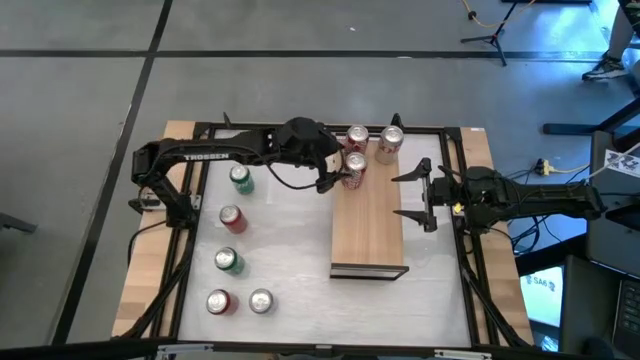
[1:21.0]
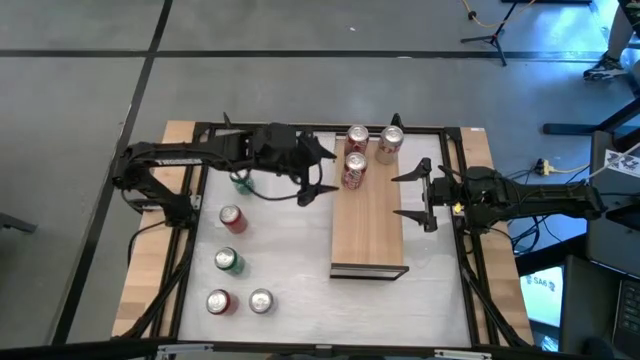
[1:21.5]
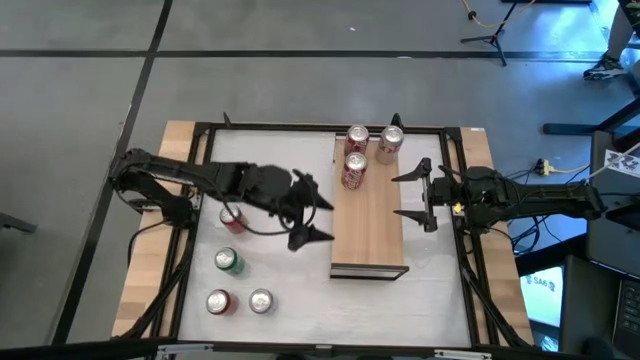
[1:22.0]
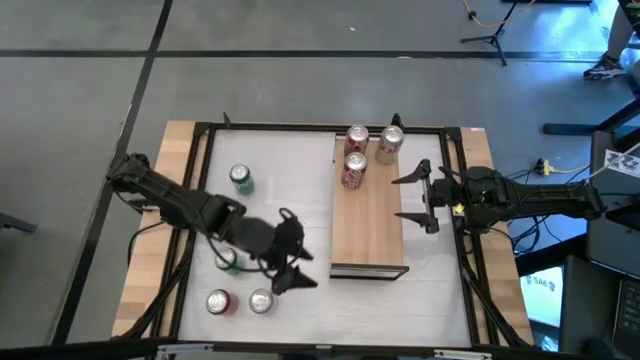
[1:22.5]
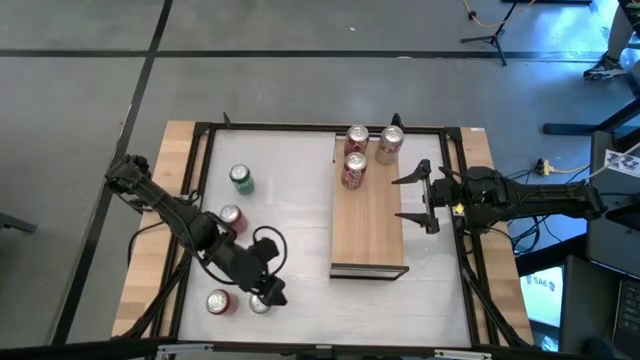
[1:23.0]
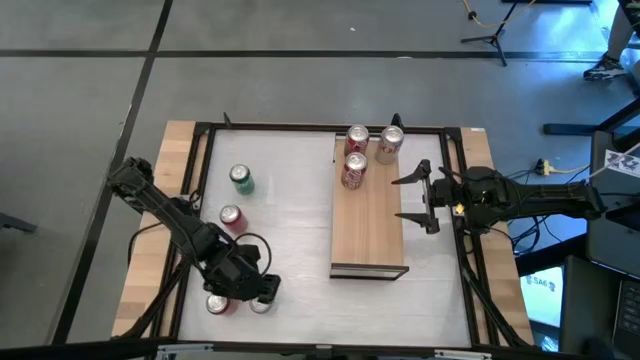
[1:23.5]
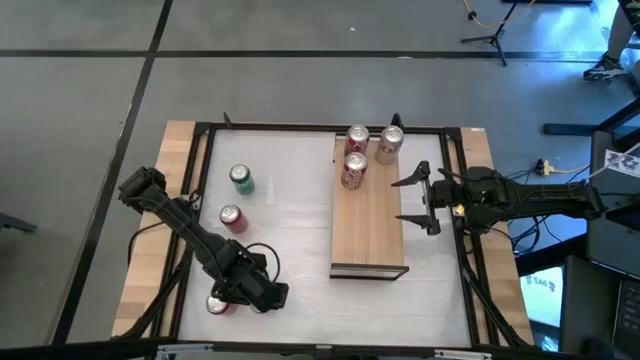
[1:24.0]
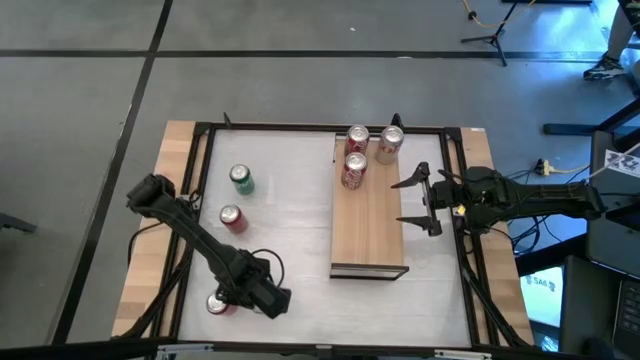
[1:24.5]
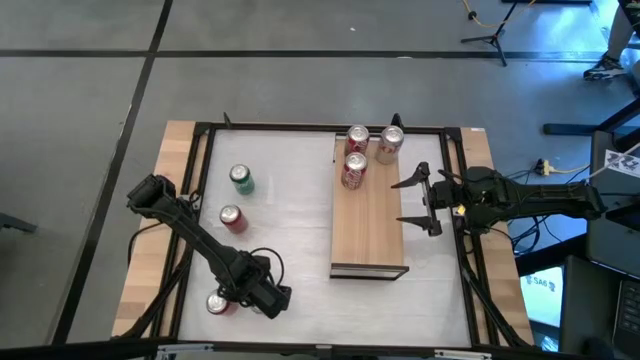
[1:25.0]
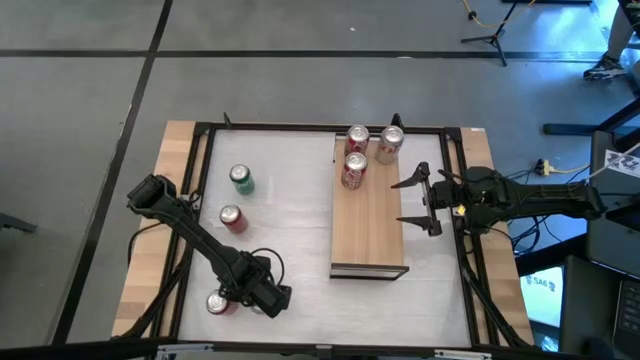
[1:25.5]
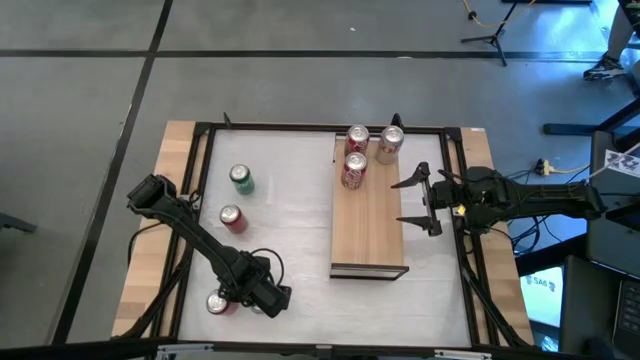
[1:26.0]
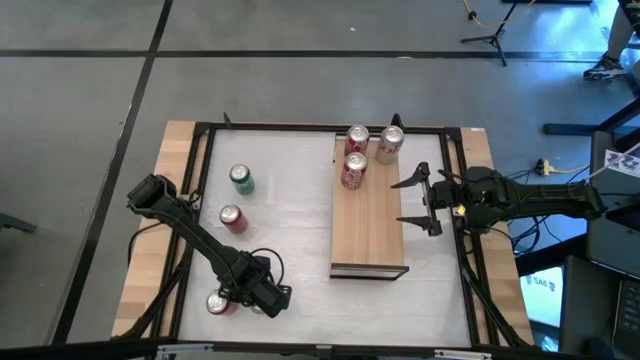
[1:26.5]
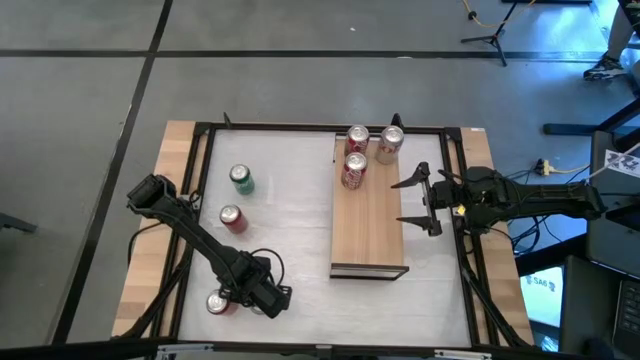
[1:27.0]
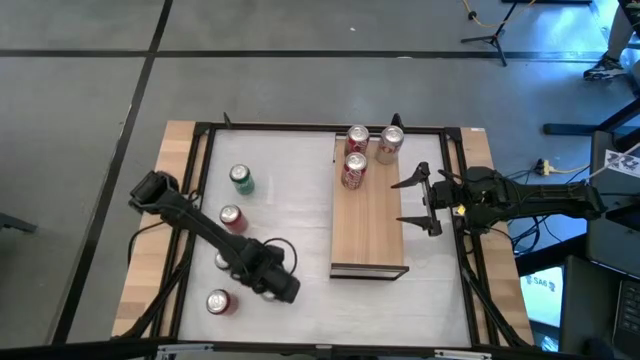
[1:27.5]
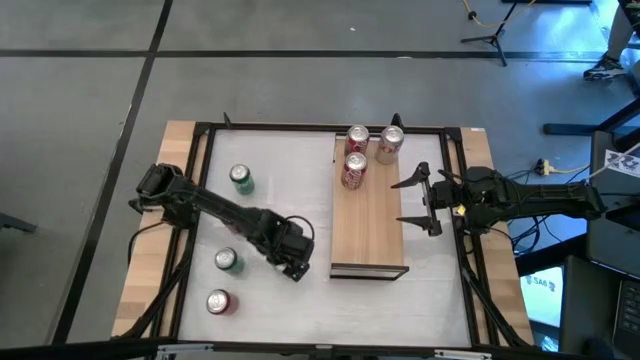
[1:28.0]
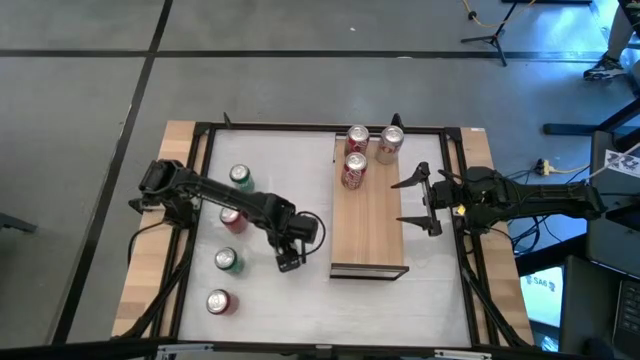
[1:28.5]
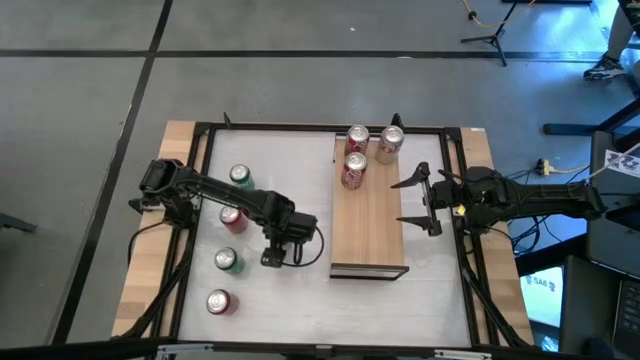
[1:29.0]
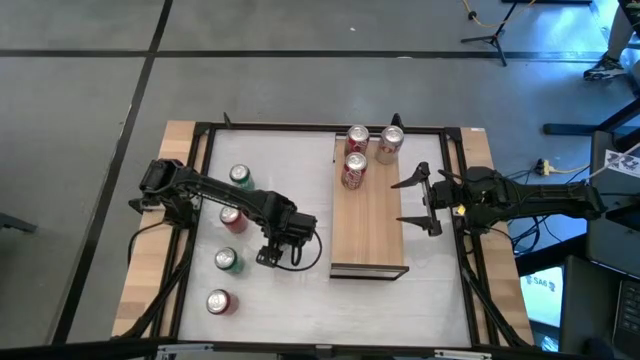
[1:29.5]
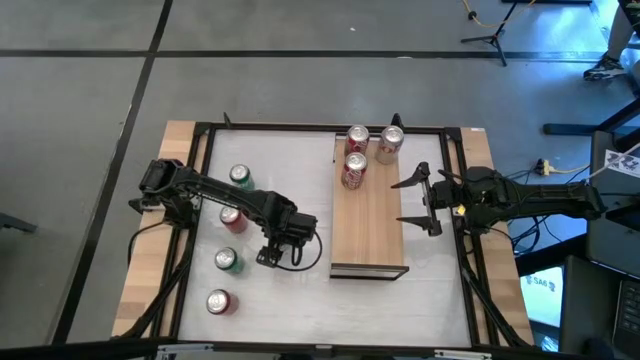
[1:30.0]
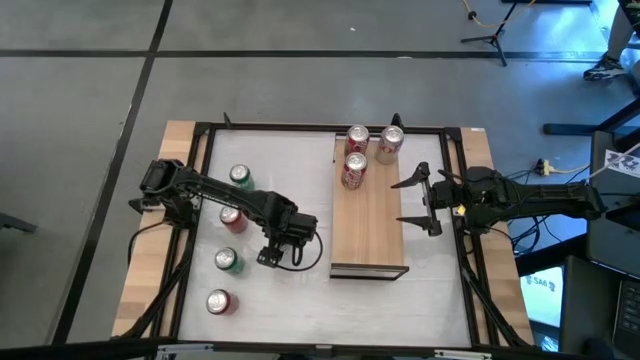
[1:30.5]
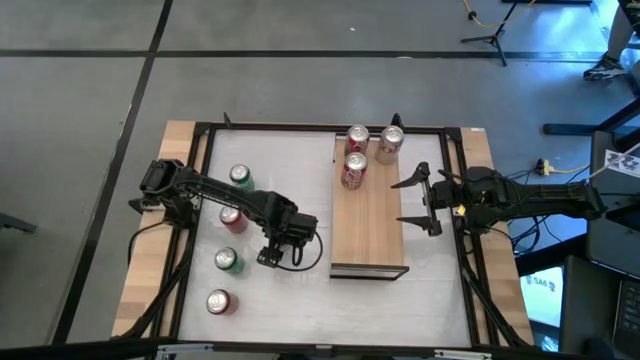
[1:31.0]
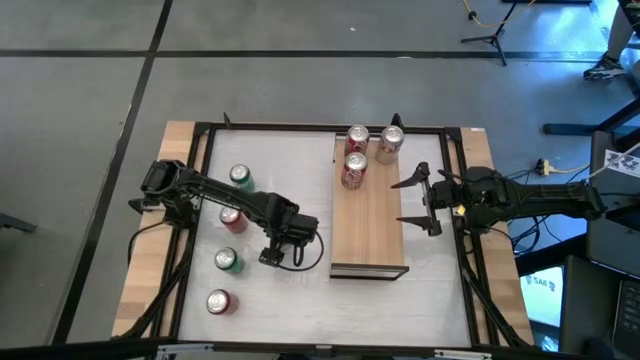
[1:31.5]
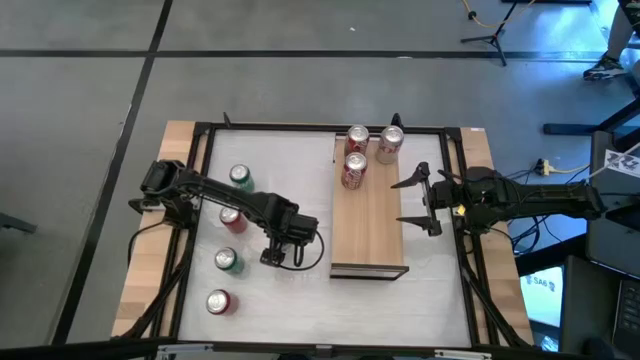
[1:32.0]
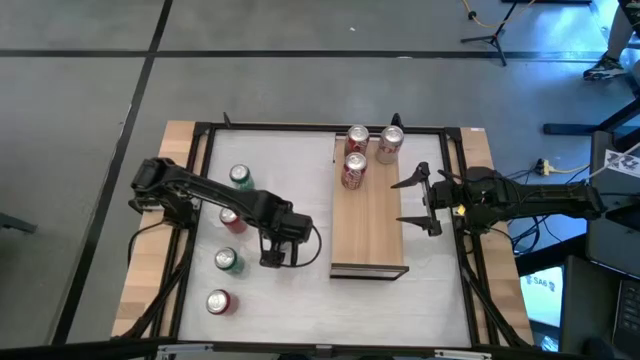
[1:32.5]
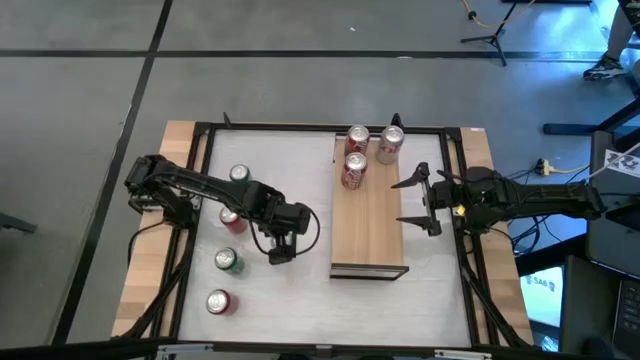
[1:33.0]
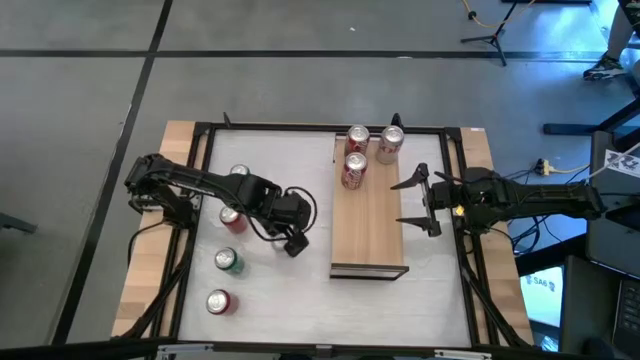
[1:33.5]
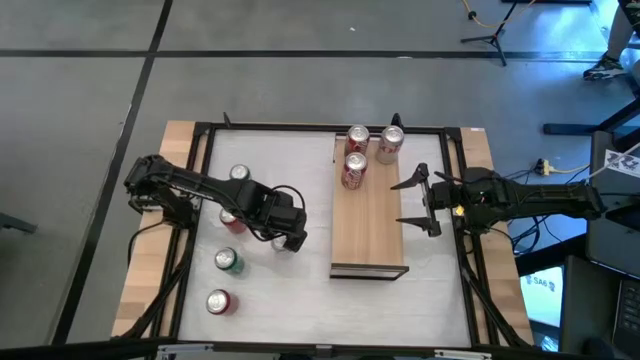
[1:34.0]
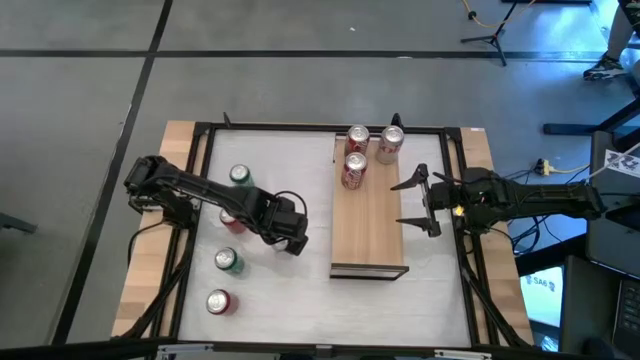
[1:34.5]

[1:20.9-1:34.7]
Task: Place canned beverage on shelf
Put the silver soda can on the shelf aligned with the other silver soda can

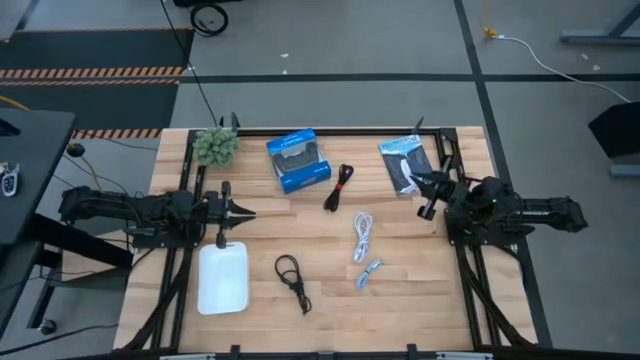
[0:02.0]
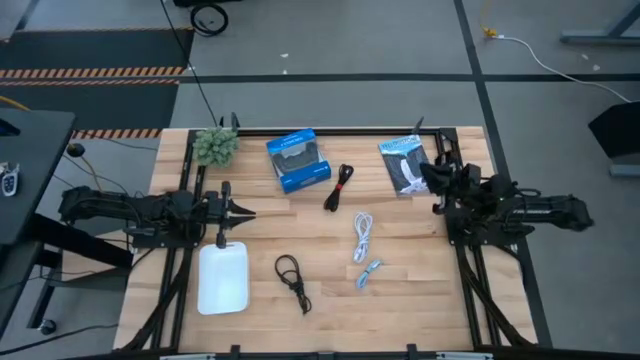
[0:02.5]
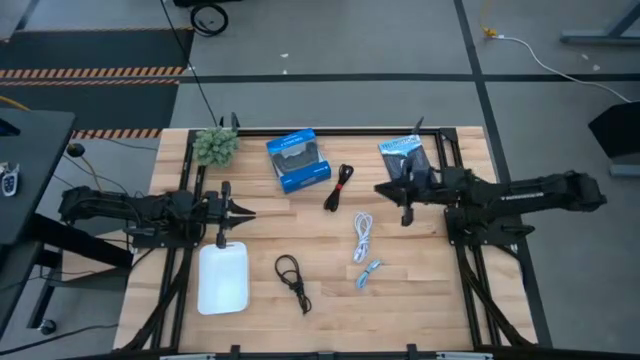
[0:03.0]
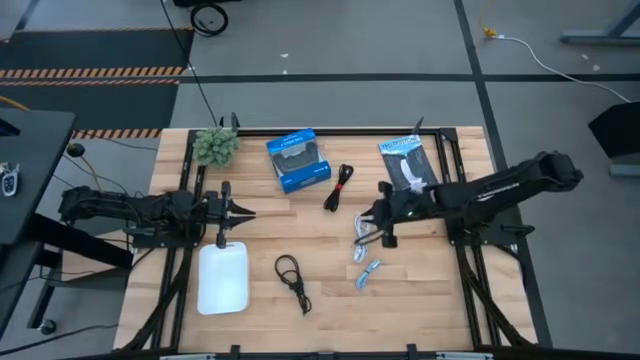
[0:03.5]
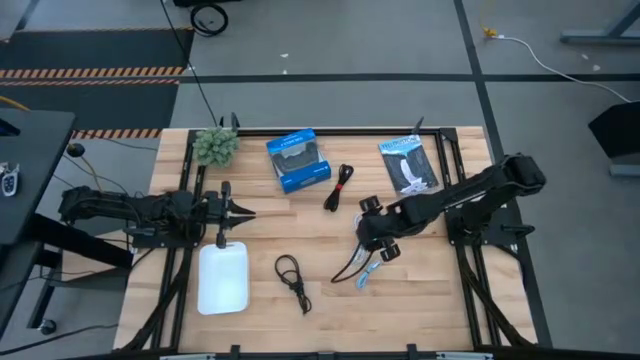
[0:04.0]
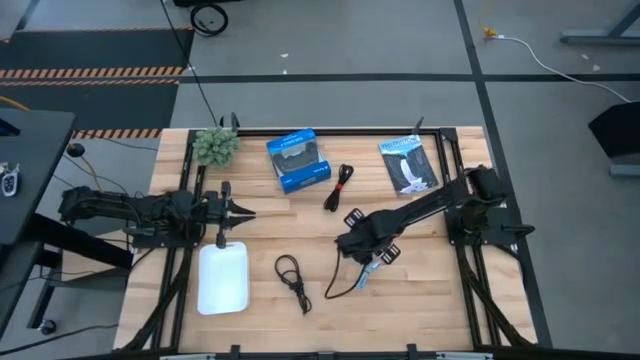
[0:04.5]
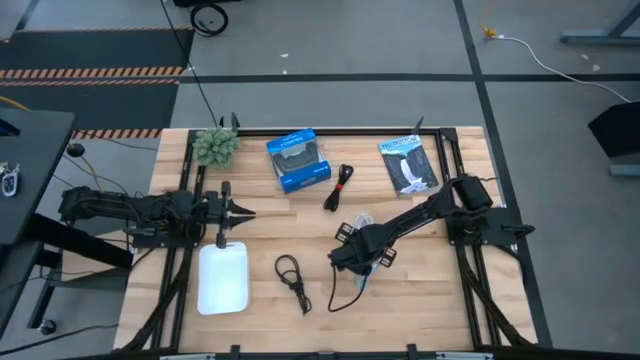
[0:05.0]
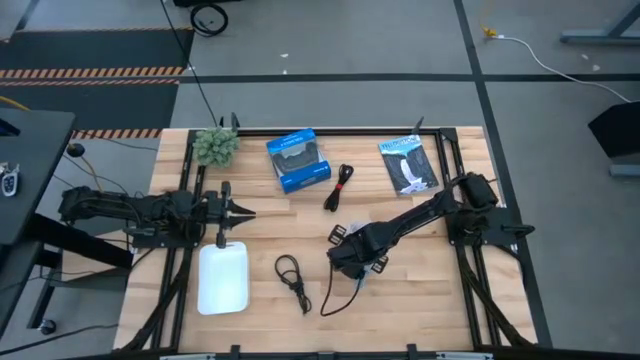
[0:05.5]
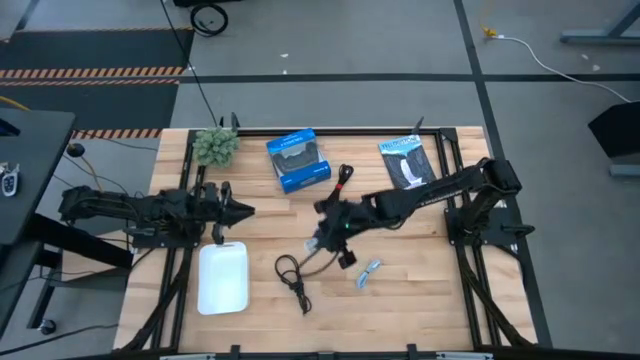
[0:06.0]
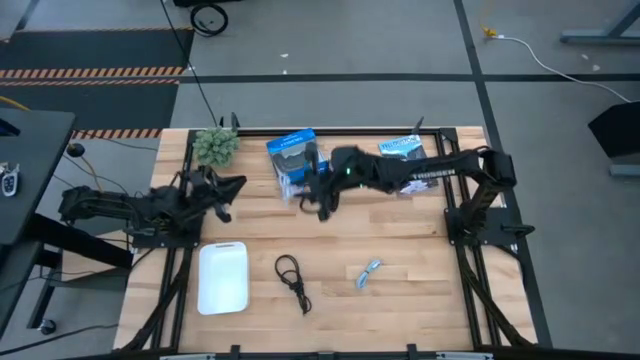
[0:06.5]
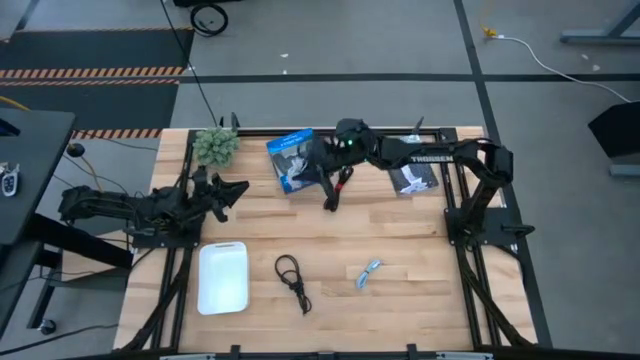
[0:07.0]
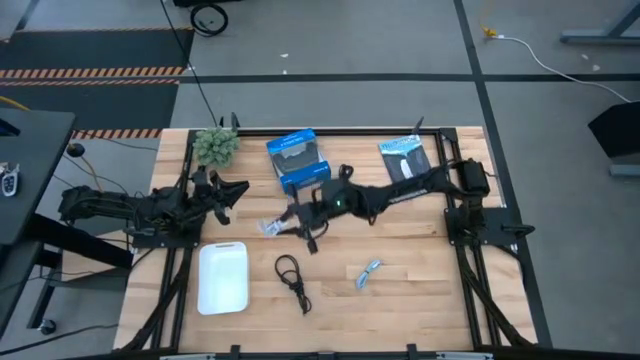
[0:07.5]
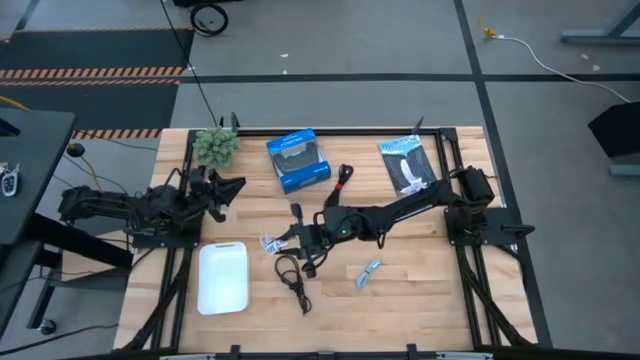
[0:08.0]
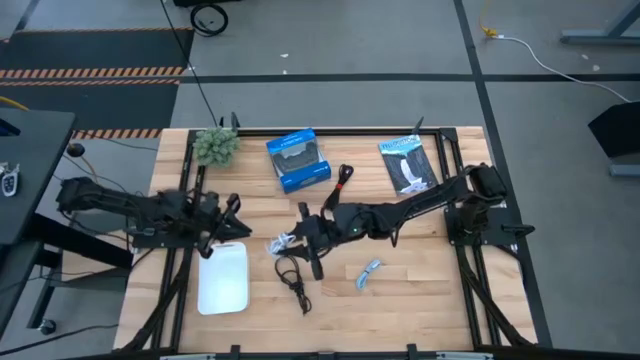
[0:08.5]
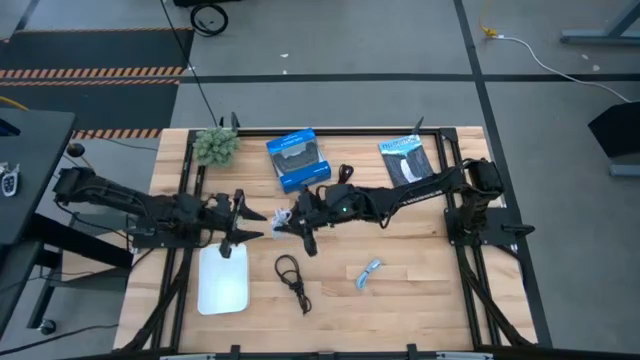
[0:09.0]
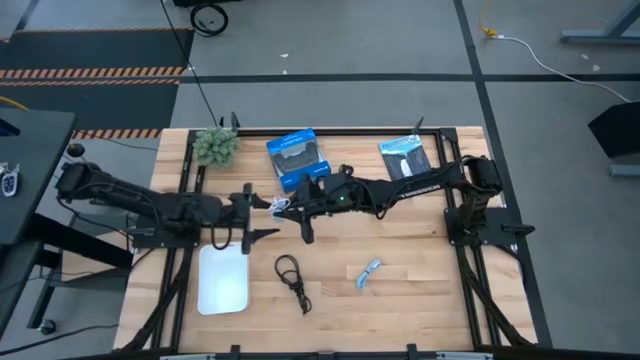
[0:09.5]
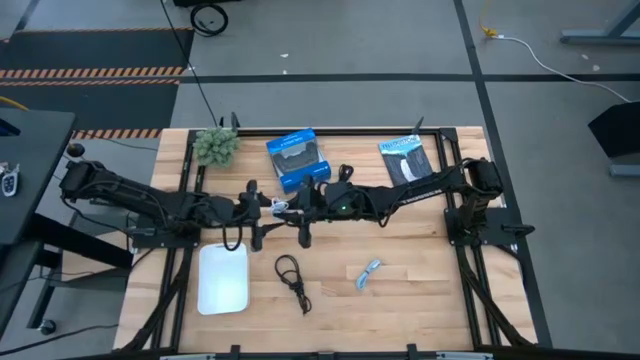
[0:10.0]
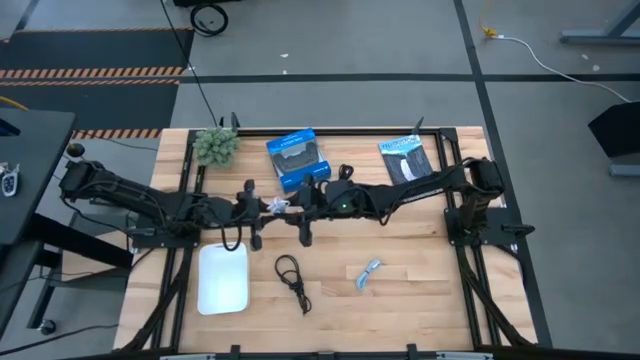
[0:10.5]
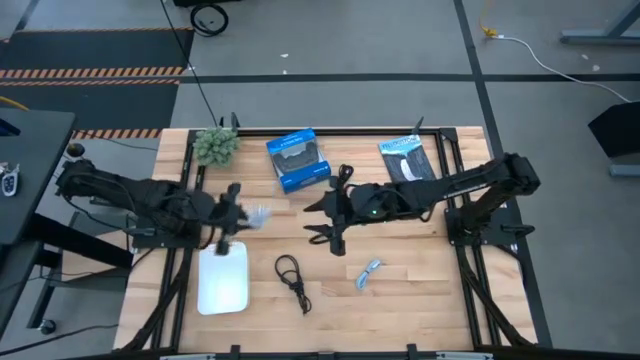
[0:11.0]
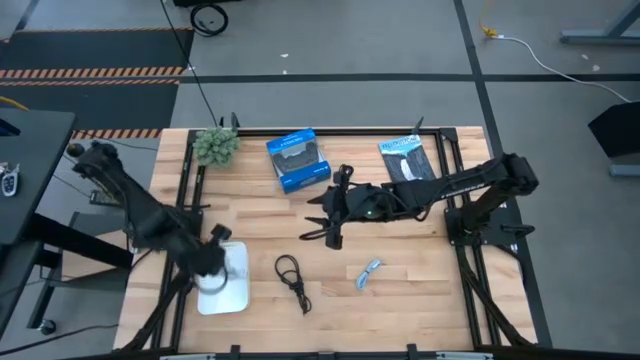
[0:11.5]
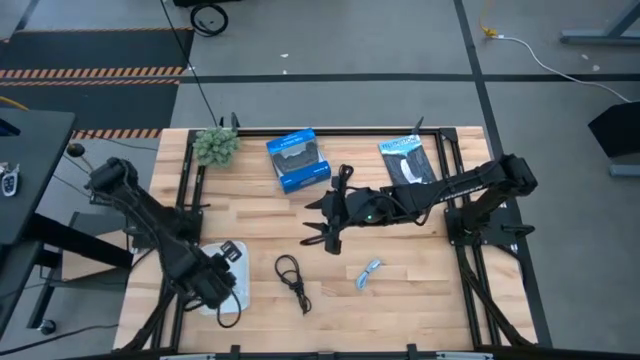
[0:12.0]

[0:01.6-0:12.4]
Task: Pick and place USB-C Cables
Put the white charger cable into the white bin
